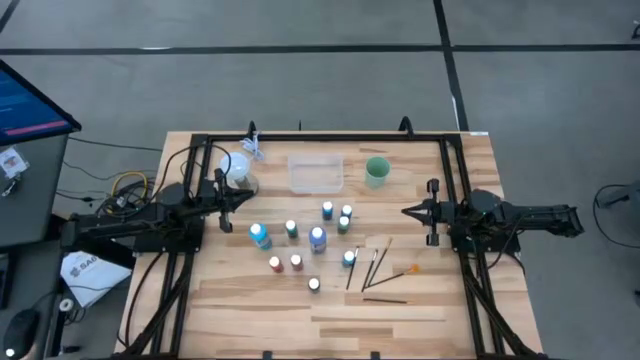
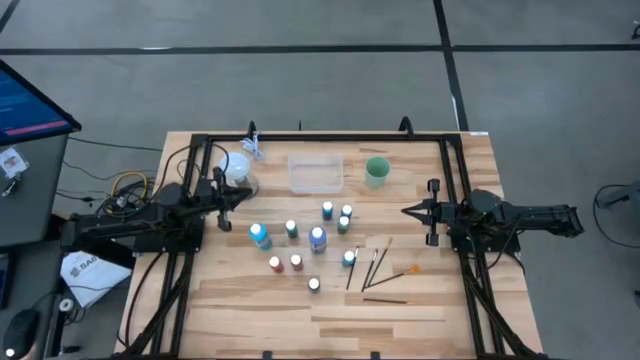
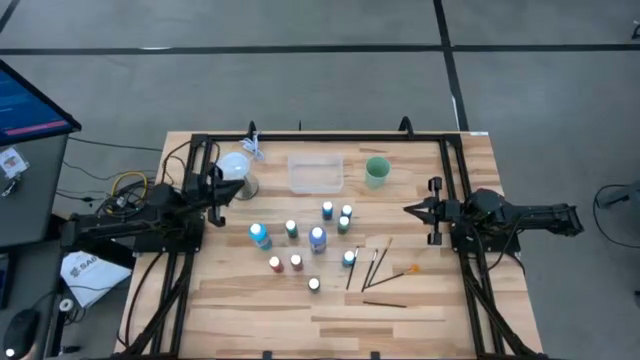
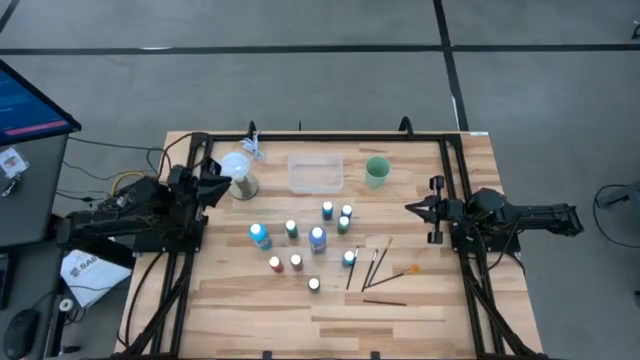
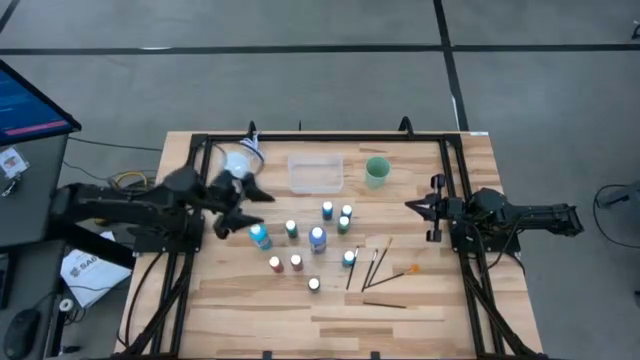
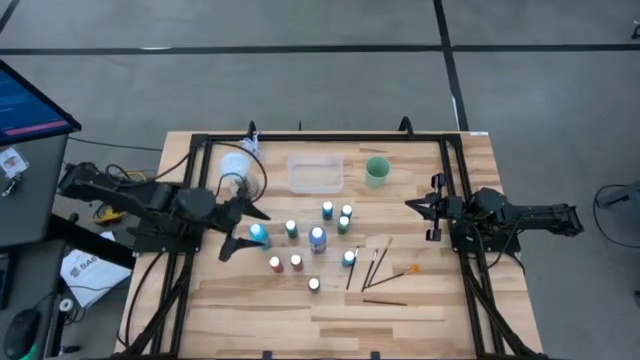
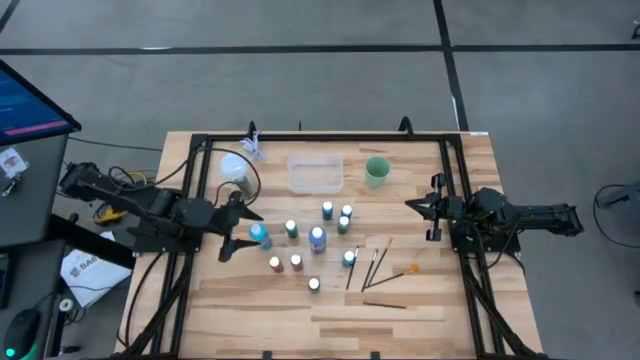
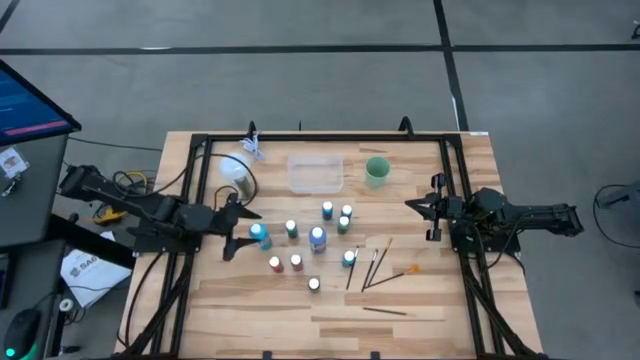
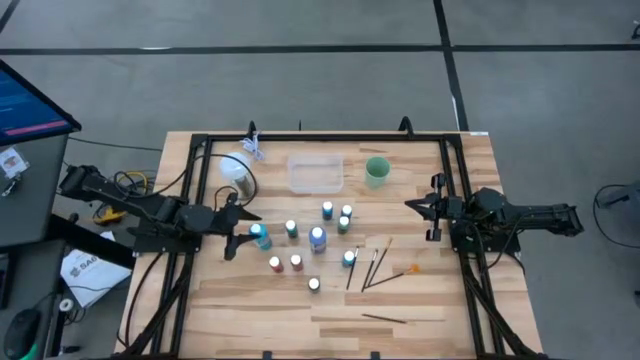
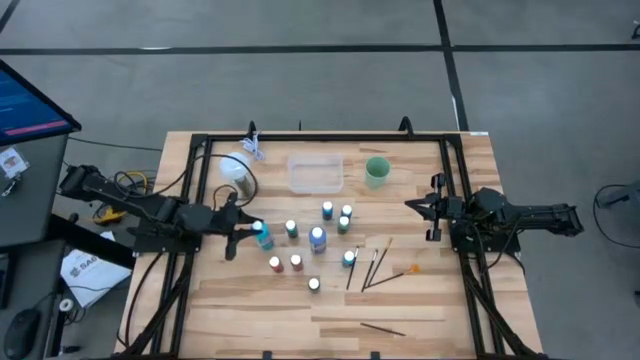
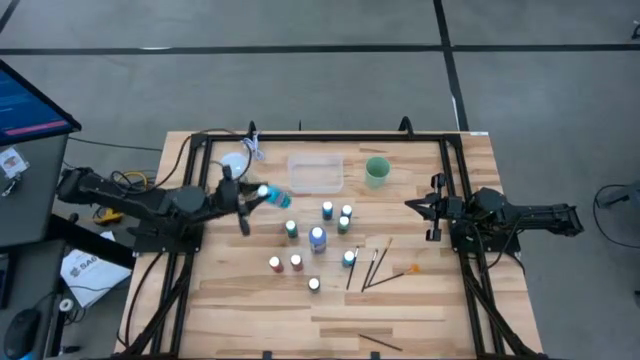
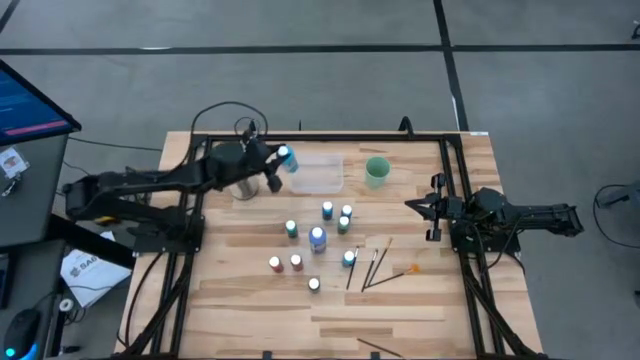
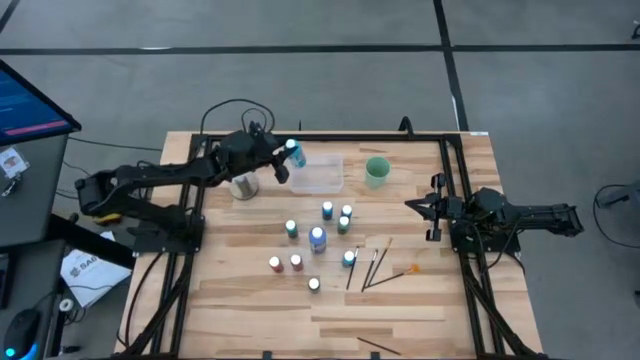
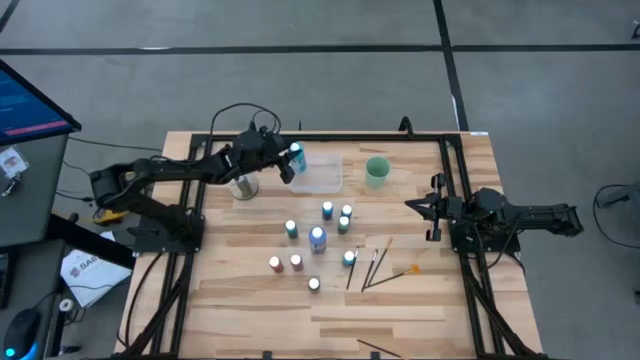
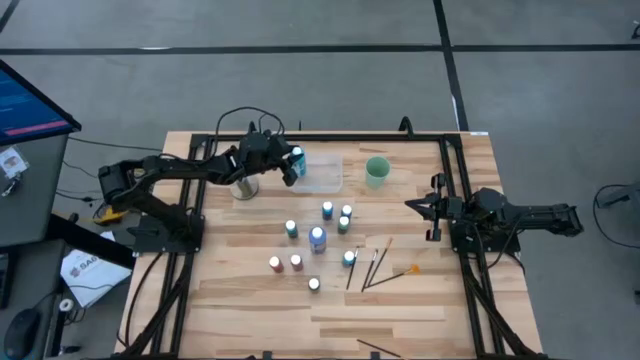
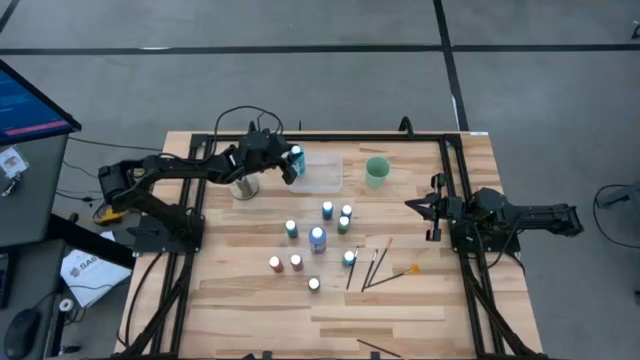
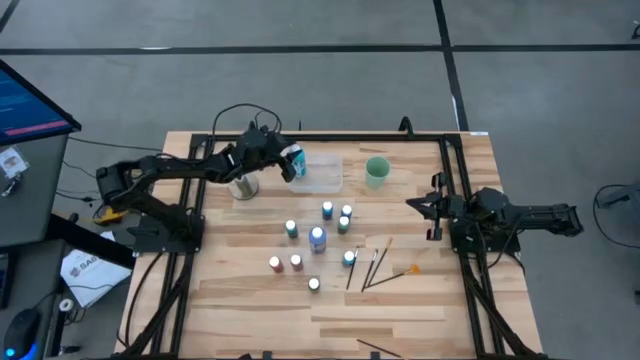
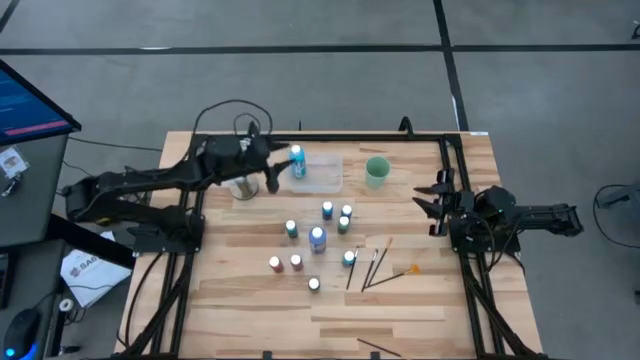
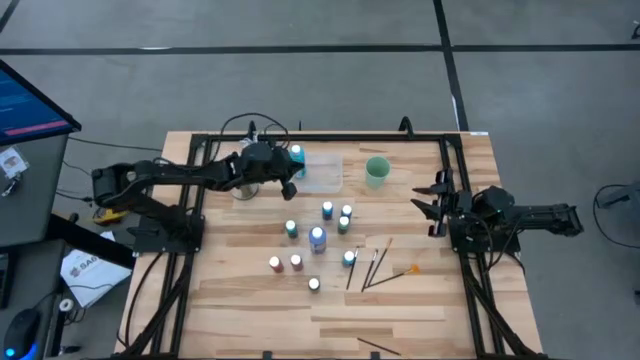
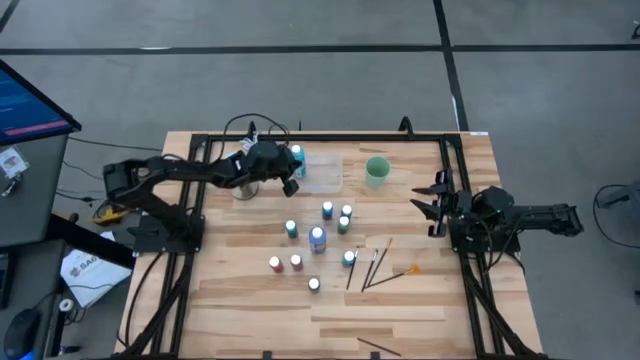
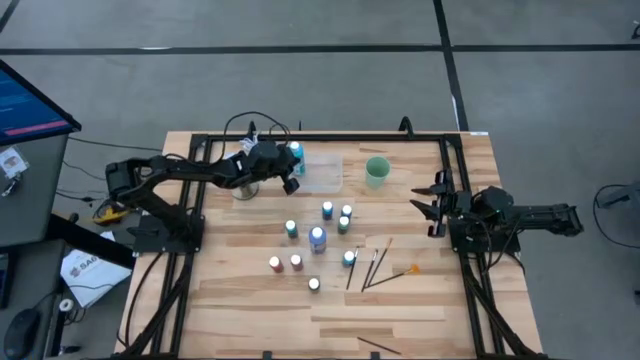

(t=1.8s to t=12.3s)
Task: Pick & Place Paint Supplies
Put the large light blue paint bottle into the bin

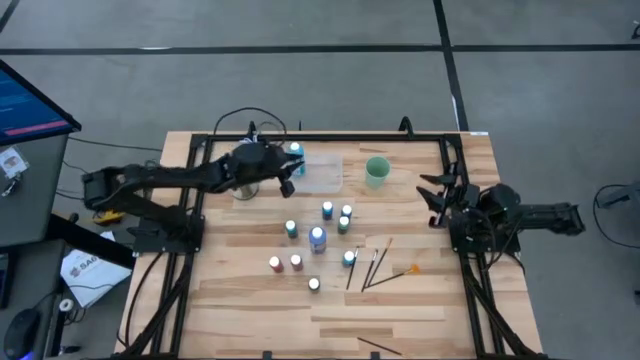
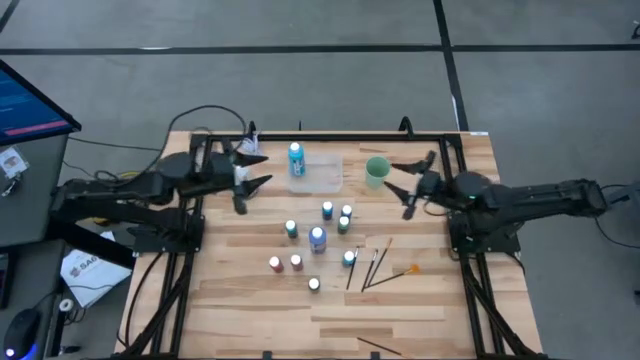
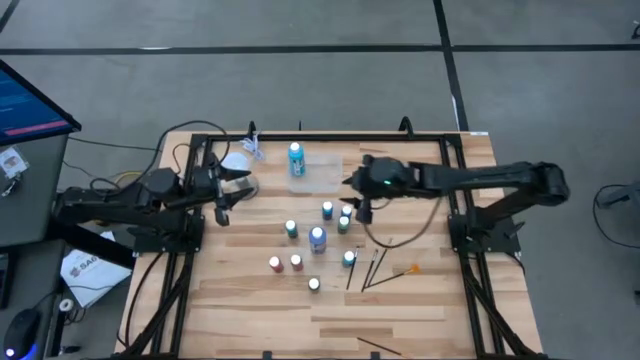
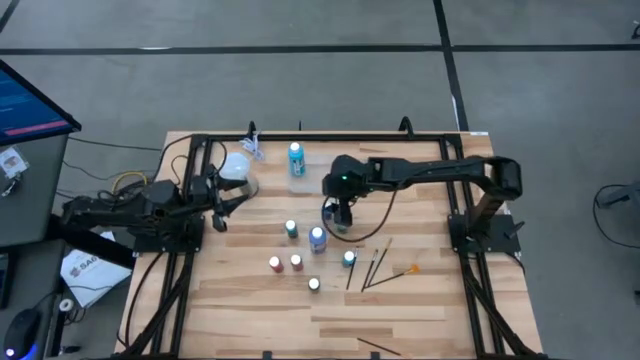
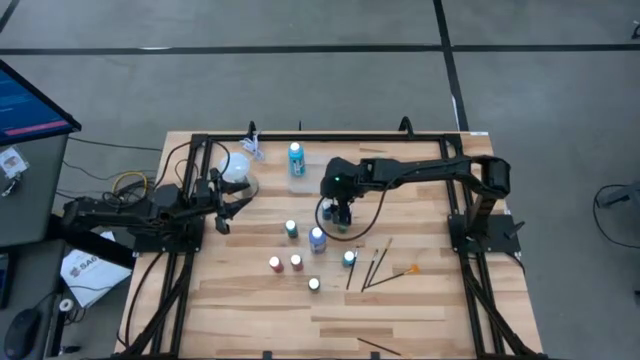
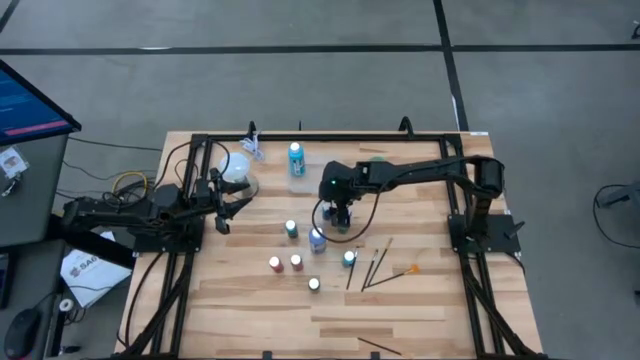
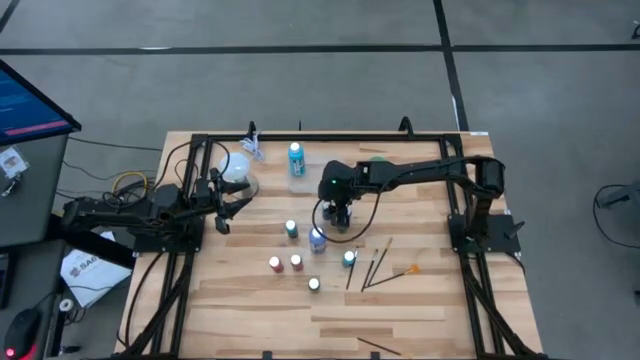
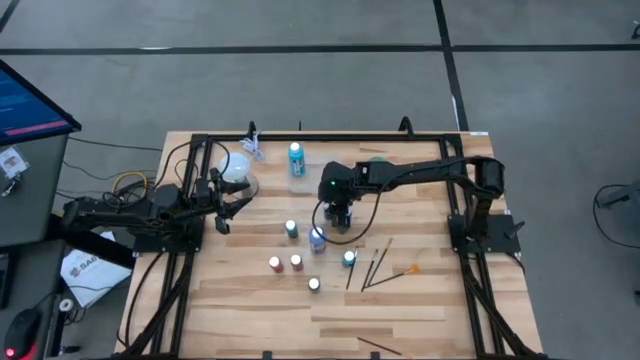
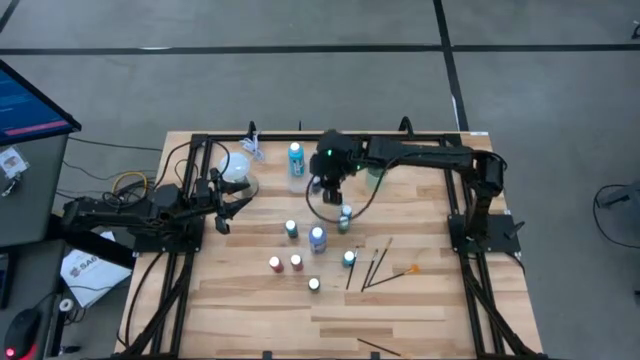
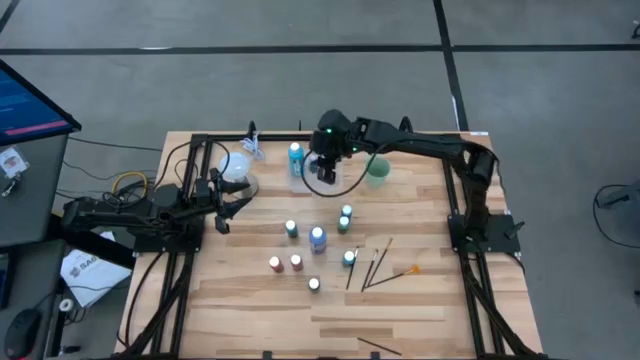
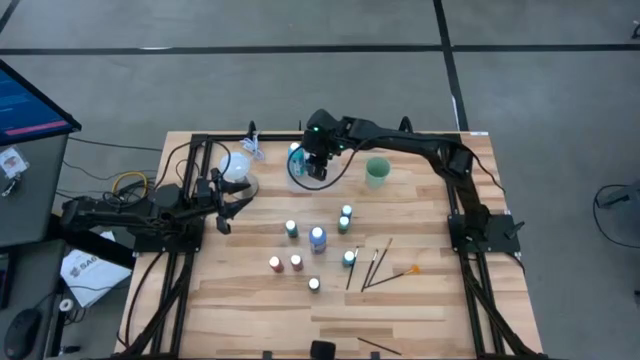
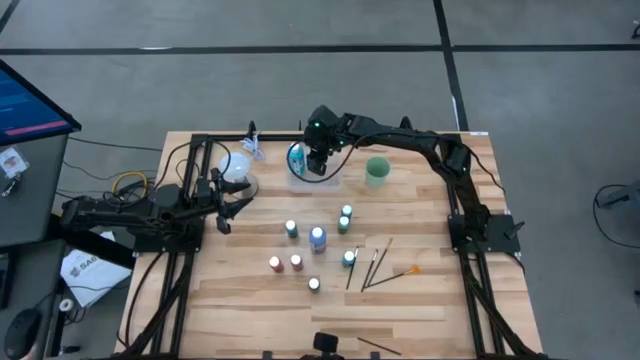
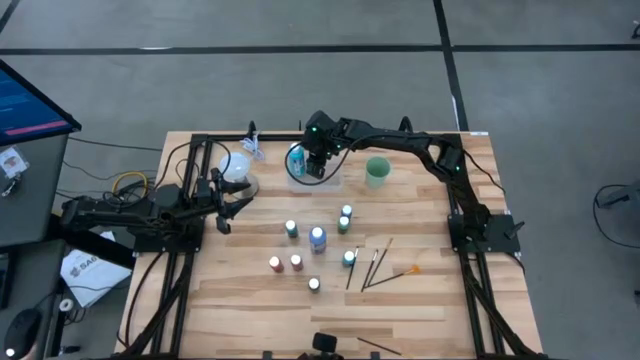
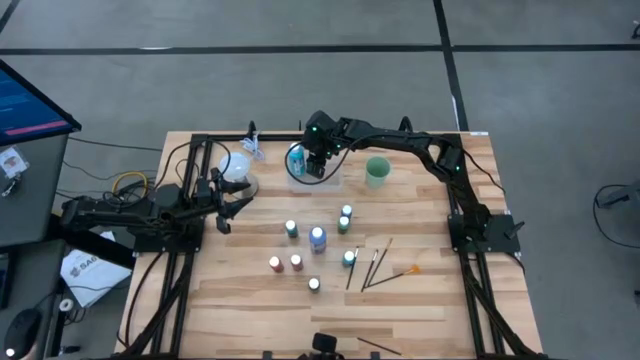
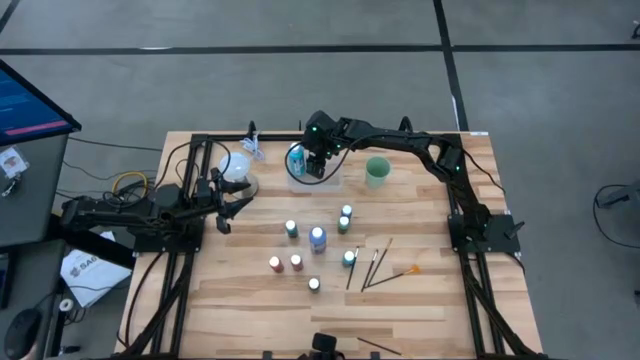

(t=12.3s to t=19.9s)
Put the small blue paint bottle into the bin

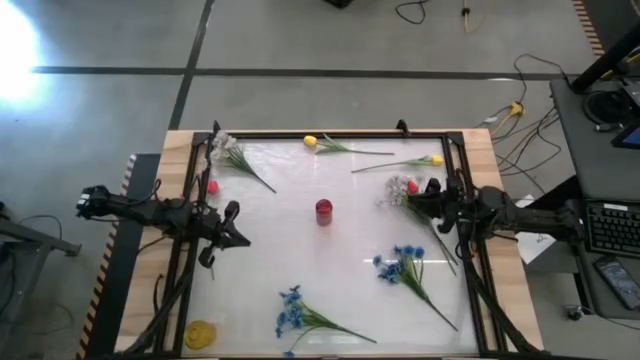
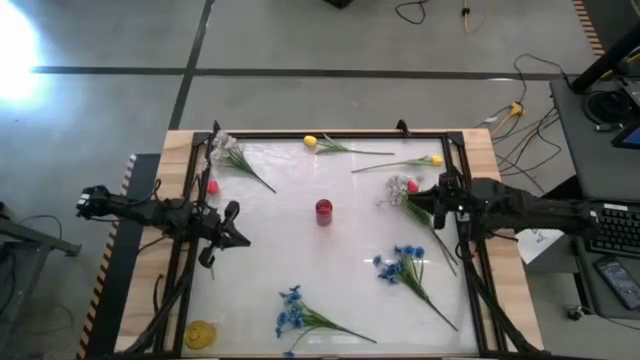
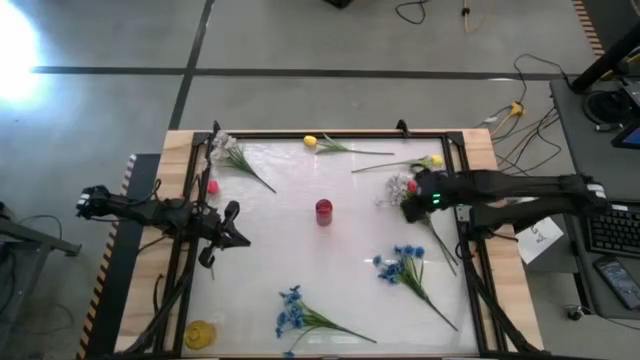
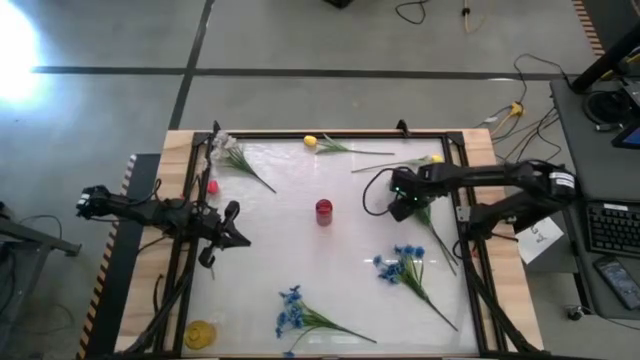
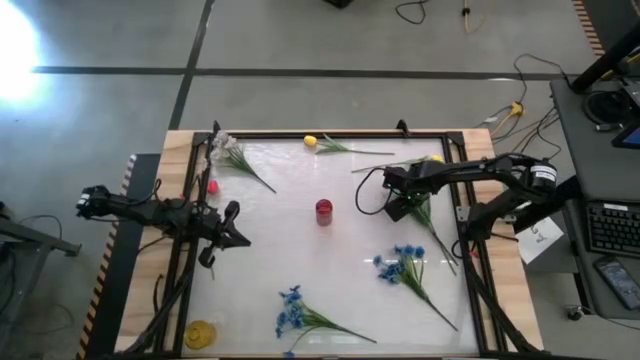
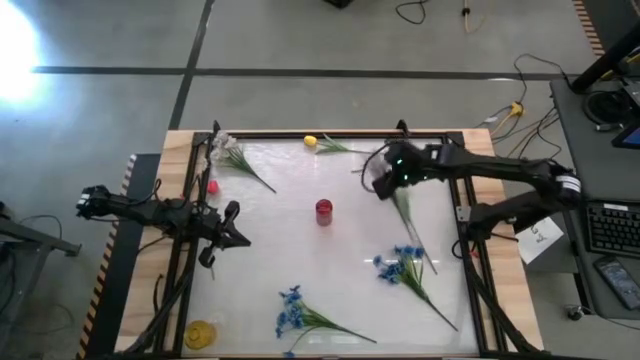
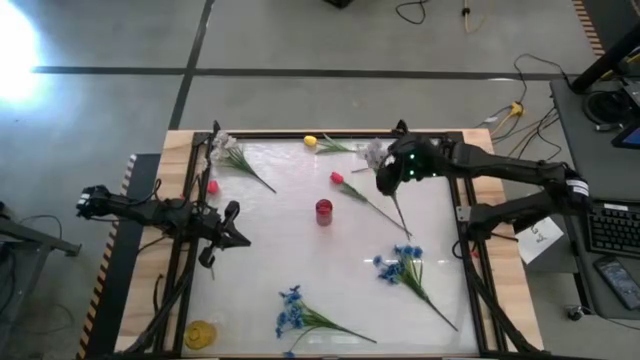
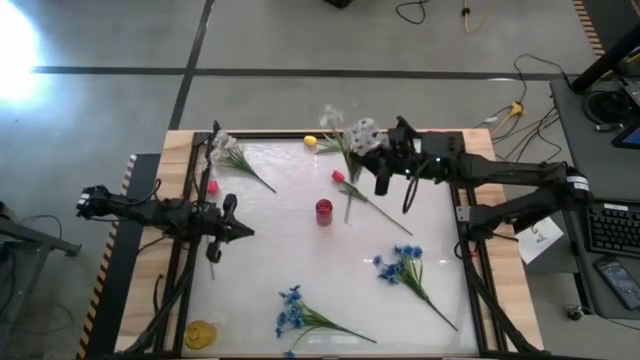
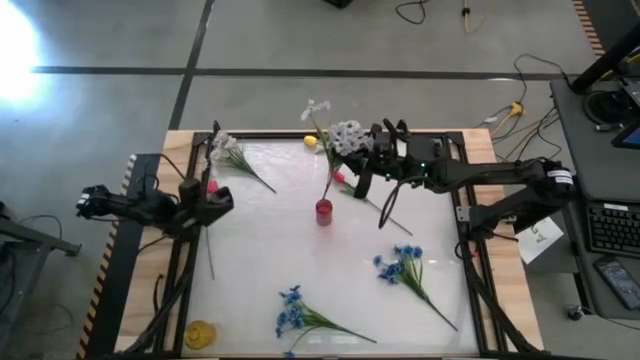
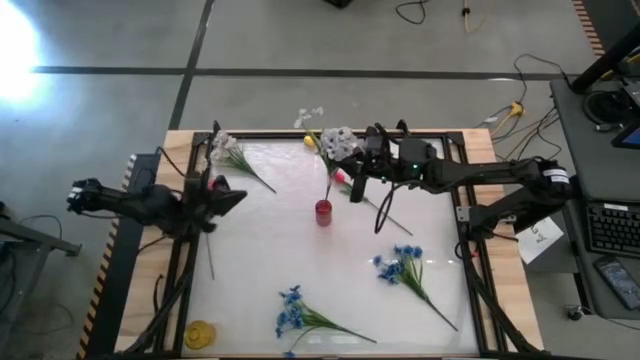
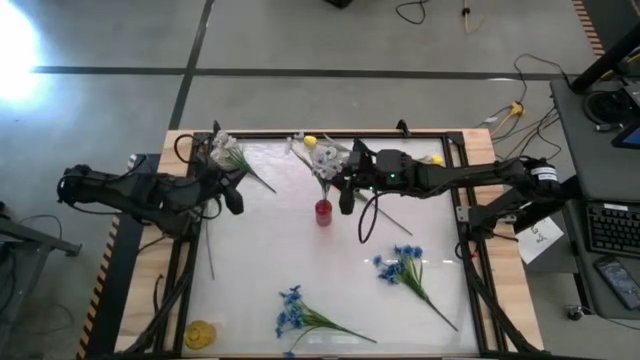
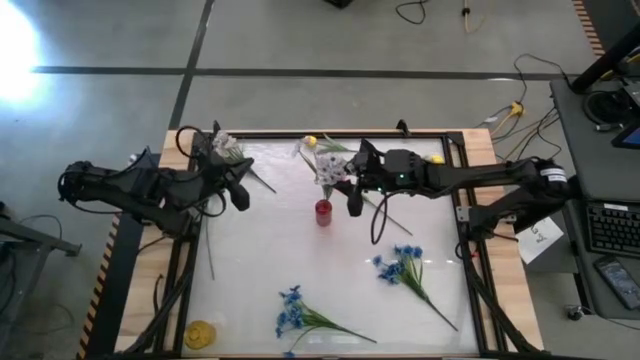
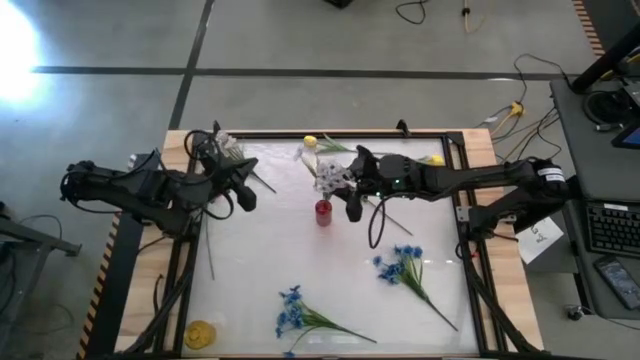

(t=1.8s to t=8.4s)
Task: Sort flowers into vase by color
Put the right white flower into the red flower vase
